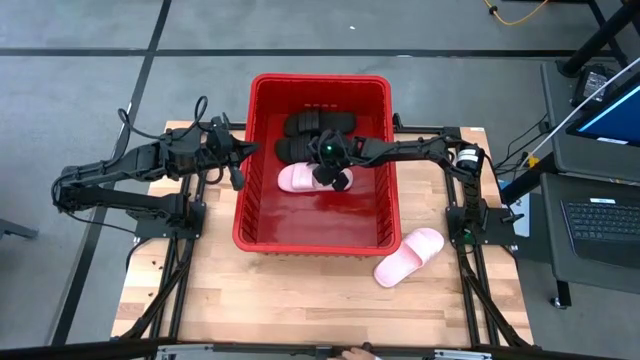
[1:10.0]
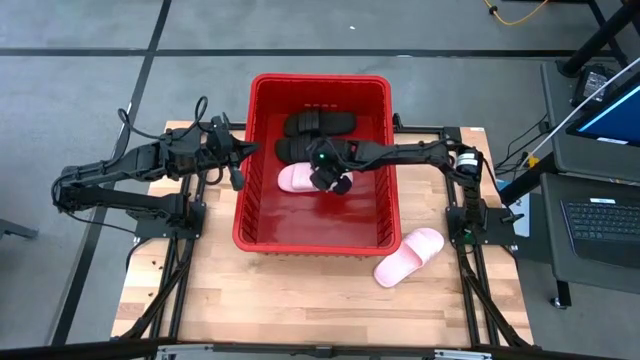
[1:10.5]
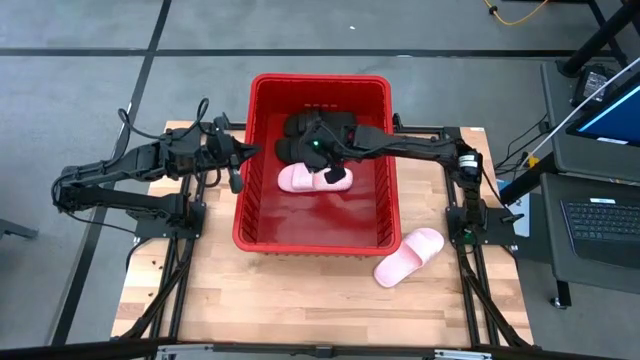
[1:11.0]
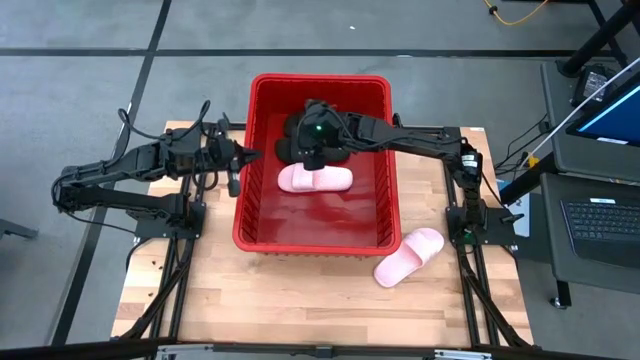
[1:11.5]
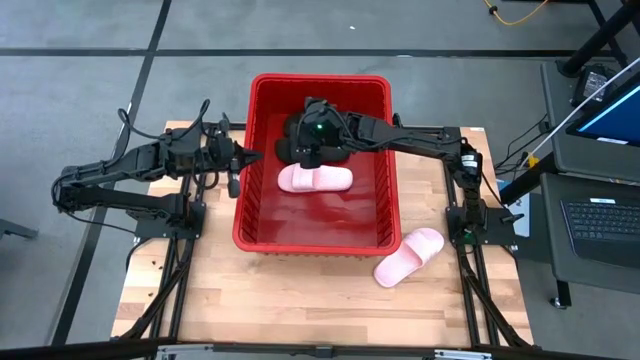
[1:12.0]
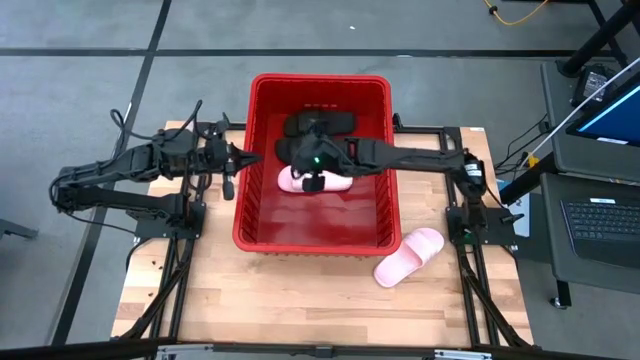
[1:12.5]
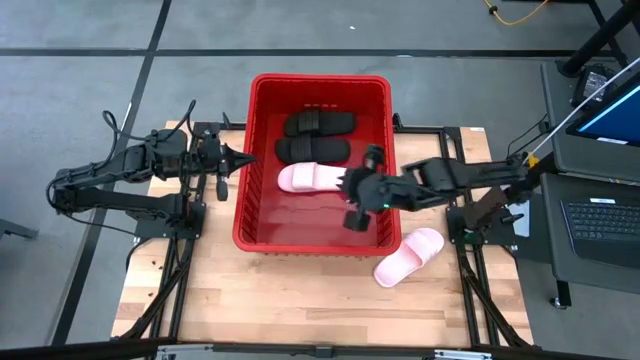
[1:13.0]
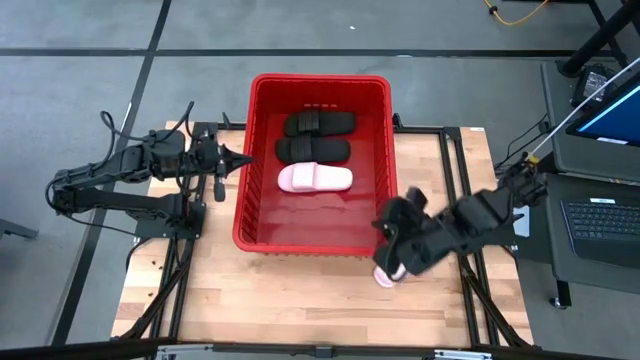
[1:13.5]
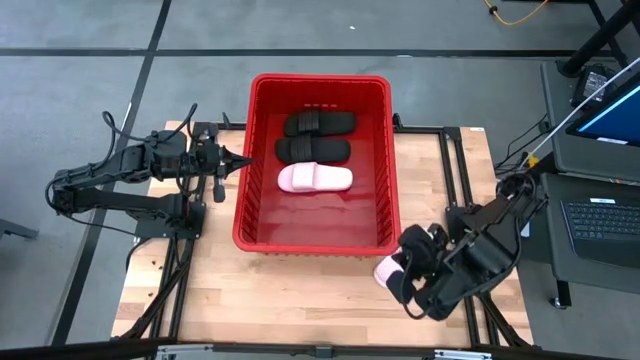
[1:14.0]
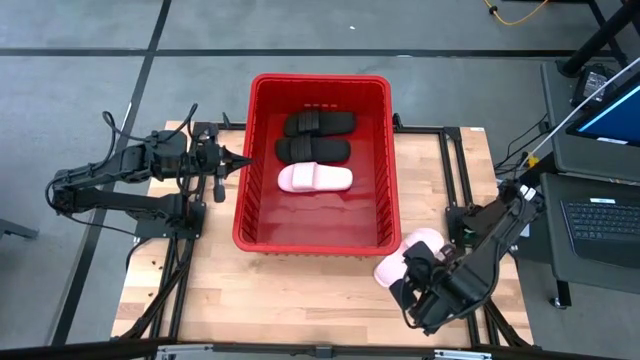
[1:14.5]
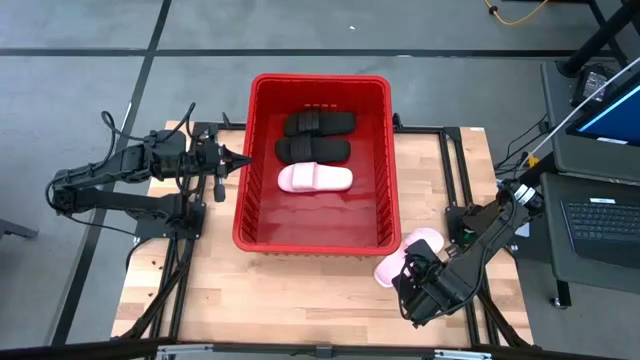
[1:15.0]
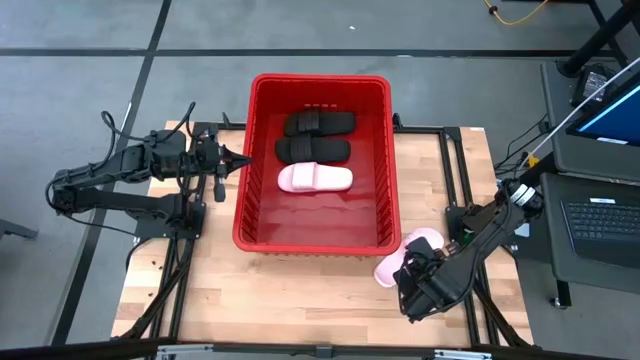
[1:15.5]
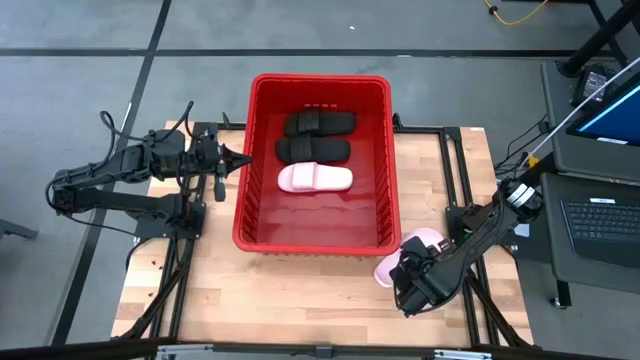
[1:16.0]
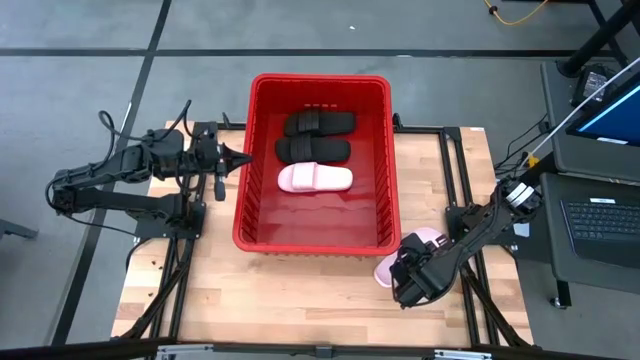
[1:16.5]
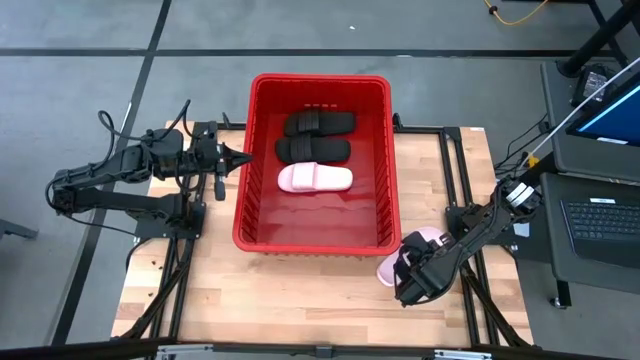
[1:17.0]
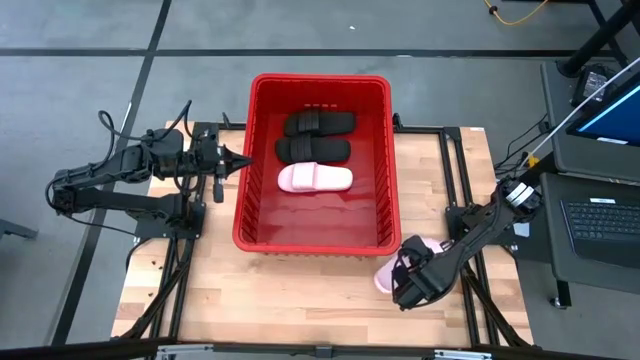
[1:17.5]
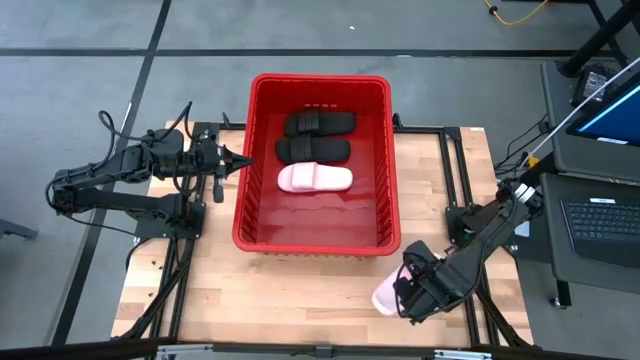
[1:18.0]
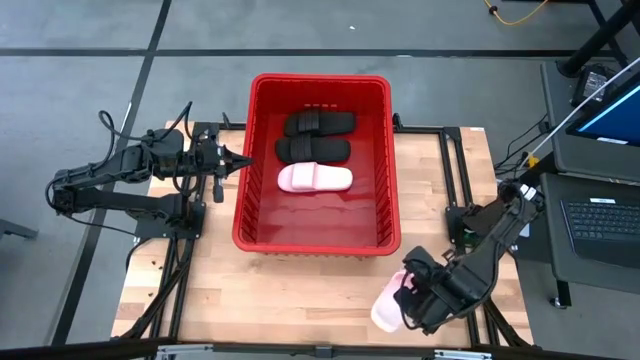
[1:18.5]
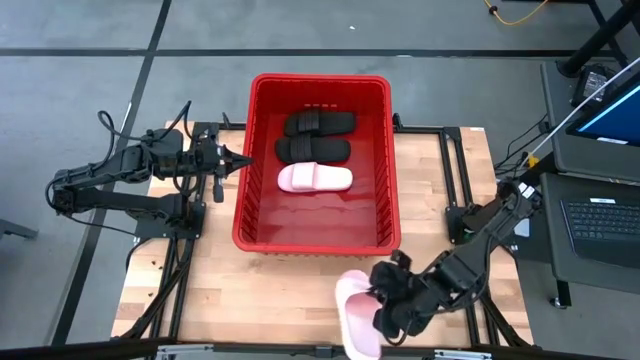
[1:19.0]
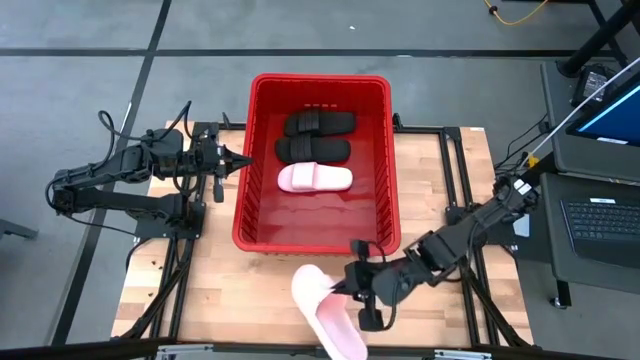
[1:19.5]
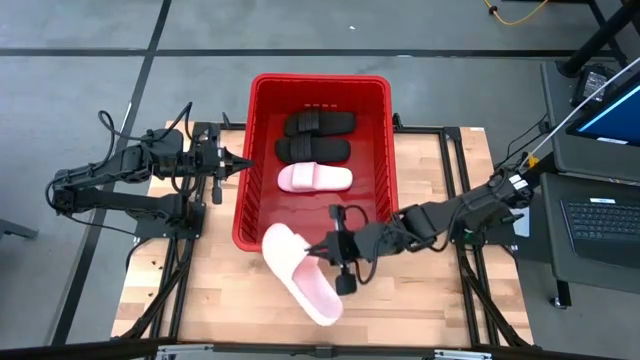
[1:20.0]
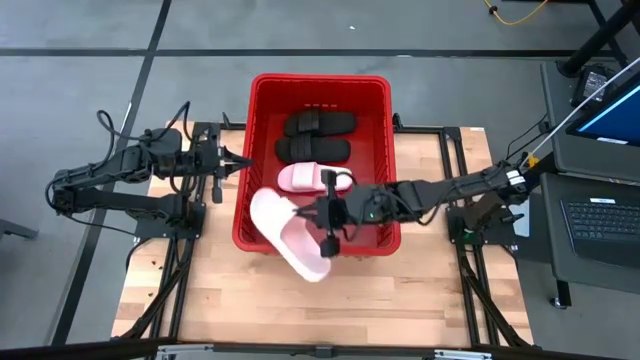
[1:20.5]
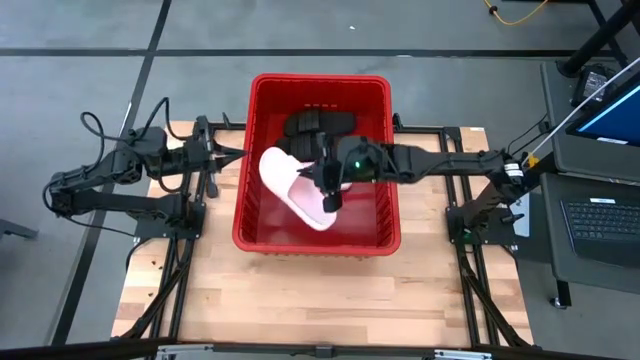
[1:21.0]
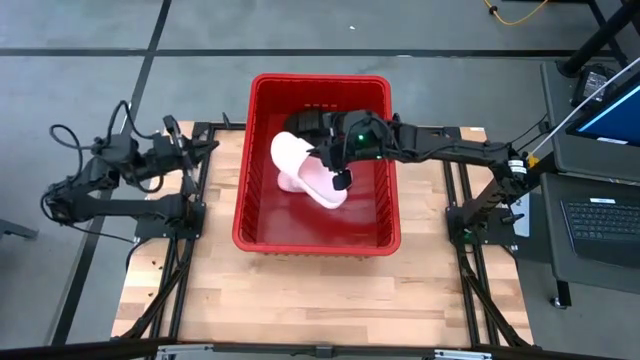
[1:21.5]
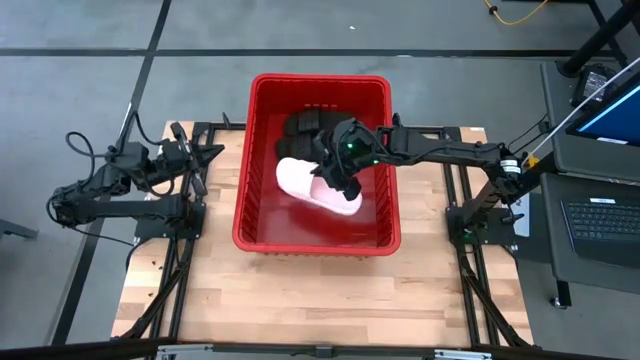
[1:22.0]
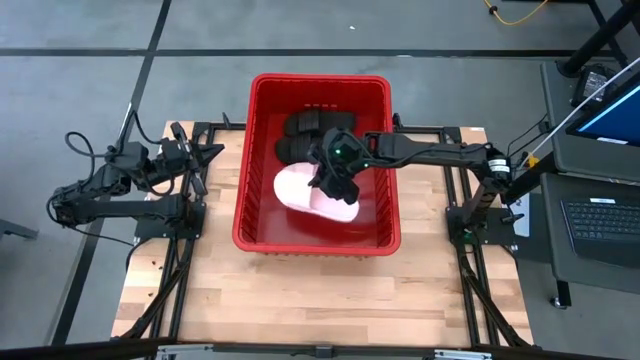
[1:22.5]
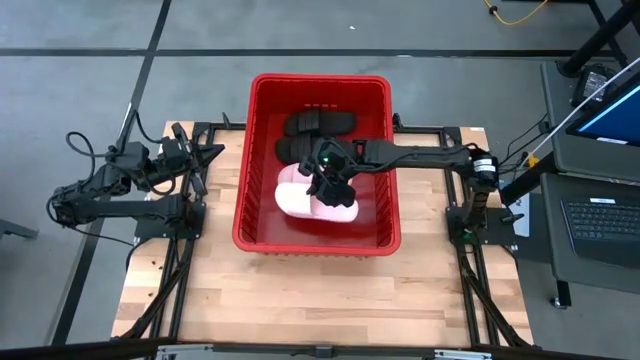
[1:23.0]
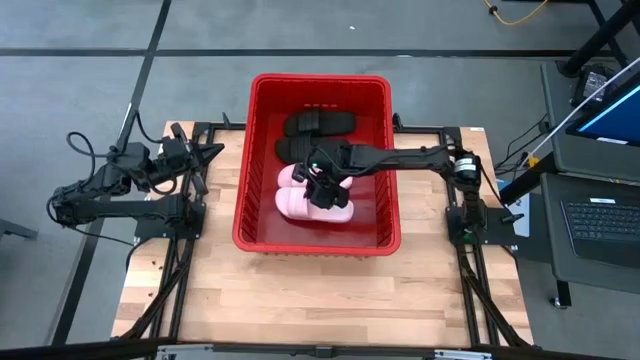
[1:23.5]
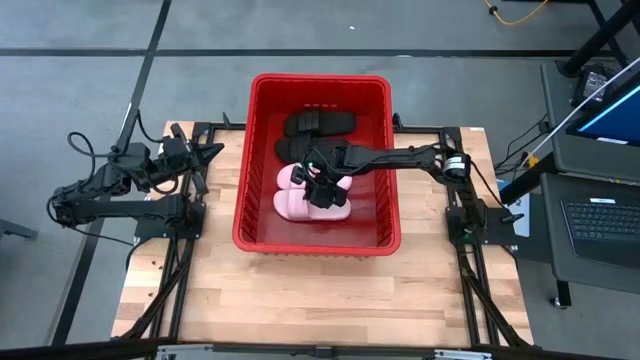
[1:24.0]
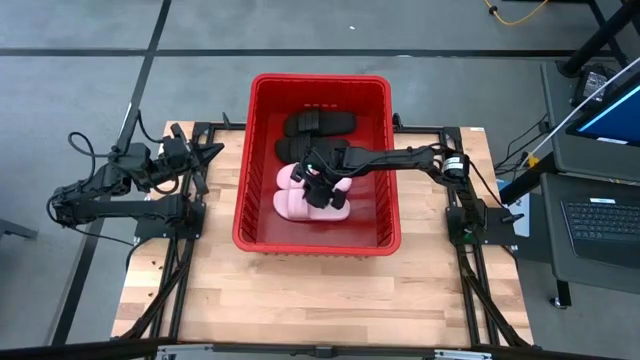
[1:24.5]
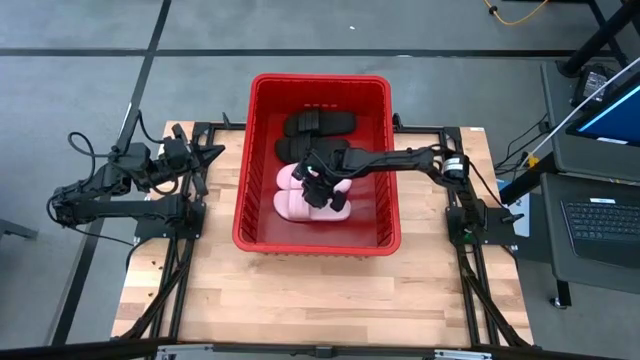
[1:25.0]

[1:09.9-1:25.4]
Task: Pick and place slides into bin
Put the pink slide into the red bin

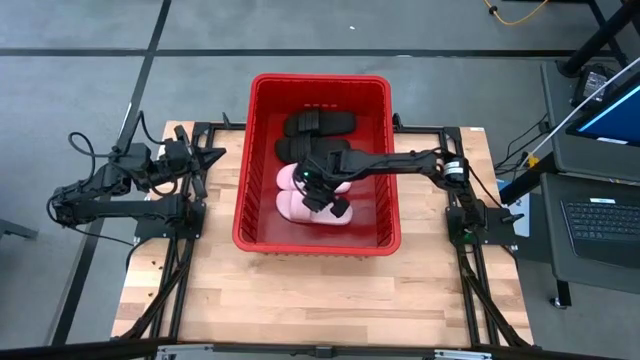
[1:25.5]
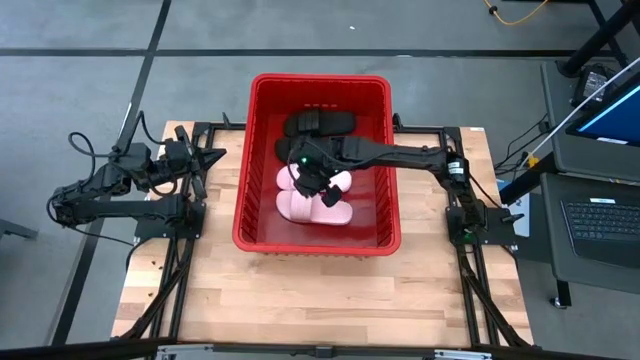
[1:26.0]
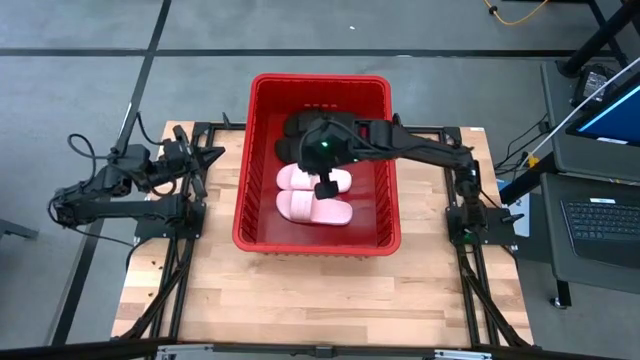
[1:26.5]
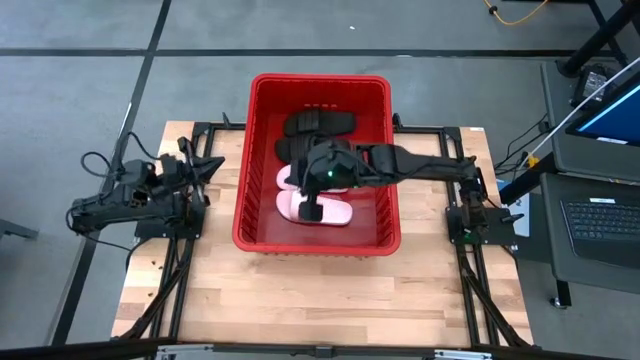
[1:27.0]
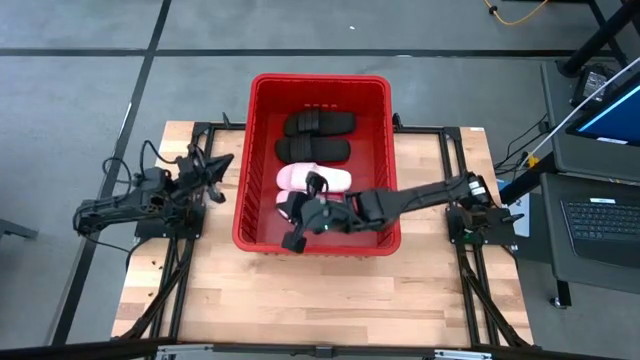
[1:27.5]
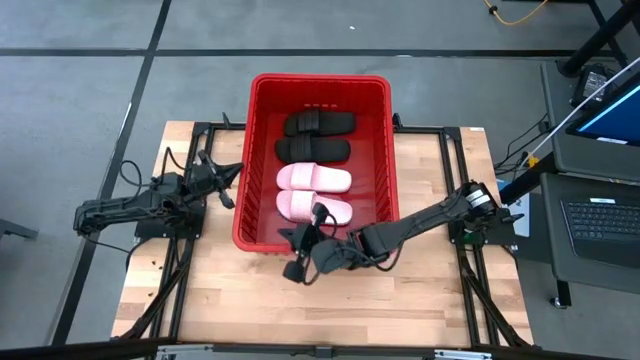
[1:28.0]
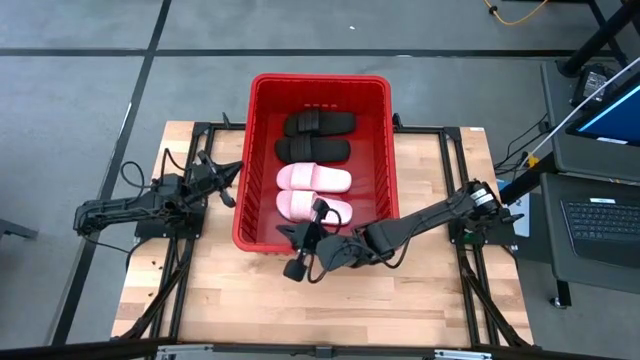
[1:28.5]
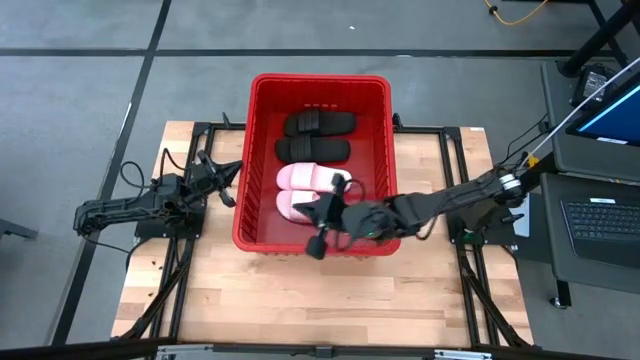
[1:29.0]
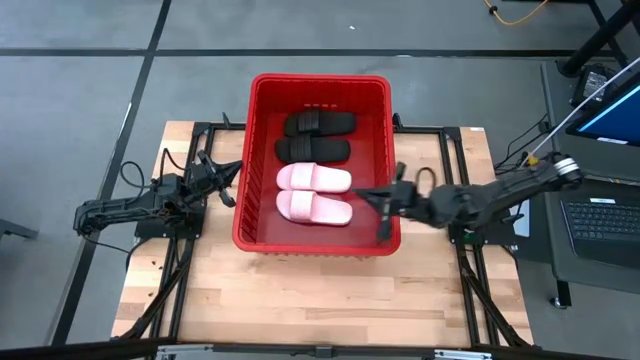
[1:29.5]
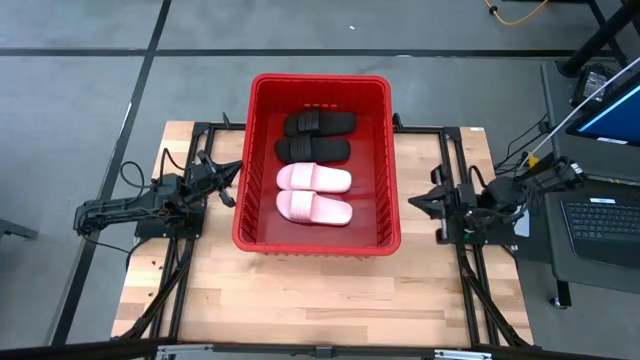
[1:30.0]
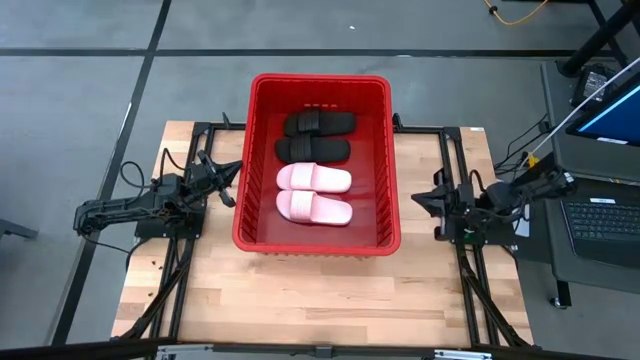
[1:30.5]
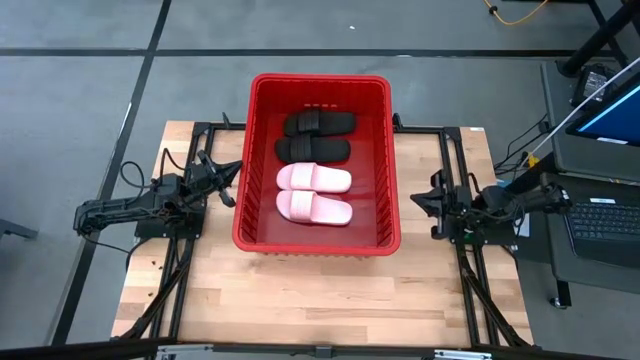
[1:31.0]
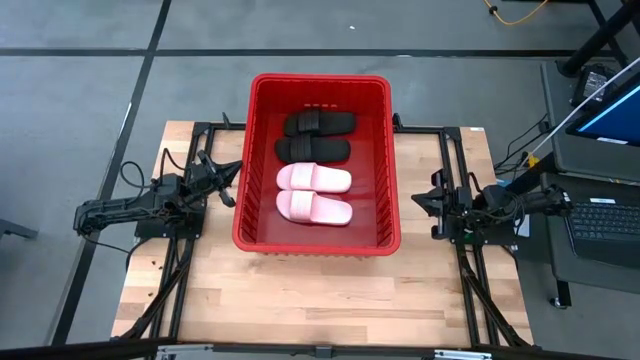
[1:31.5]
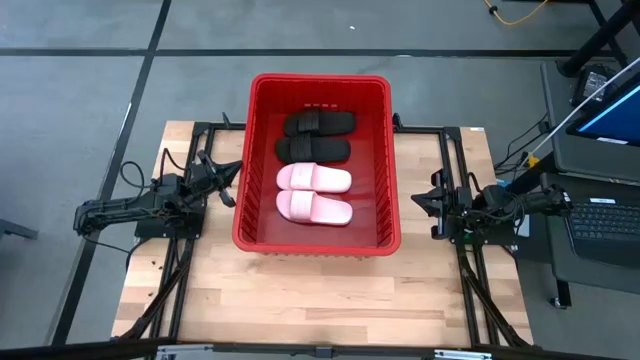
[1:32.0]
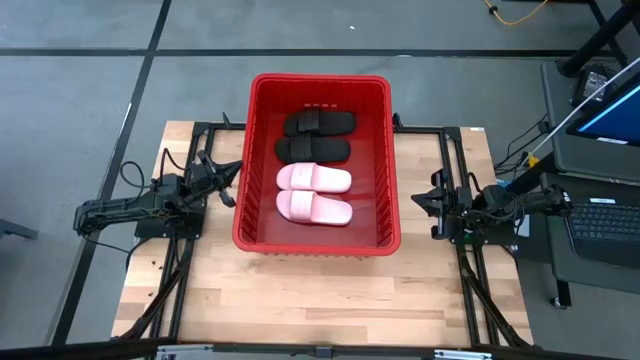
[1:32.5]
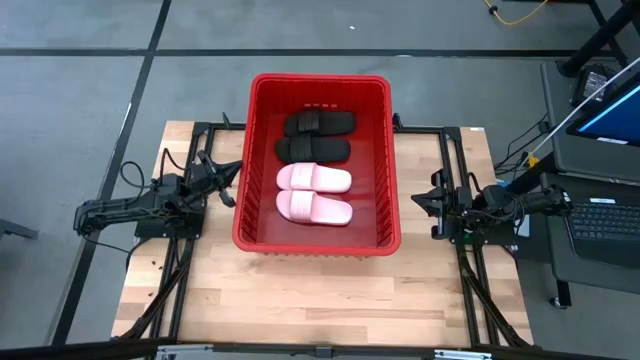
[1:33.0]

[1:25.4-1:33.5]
Return to Home Position
